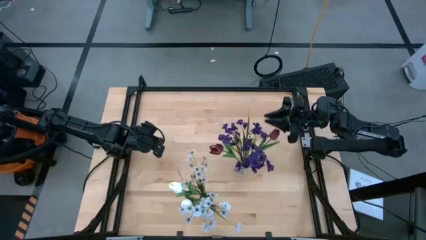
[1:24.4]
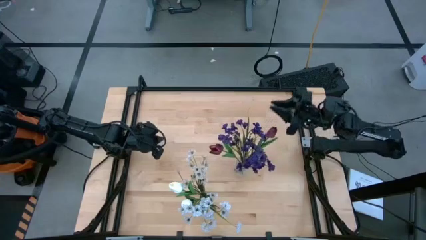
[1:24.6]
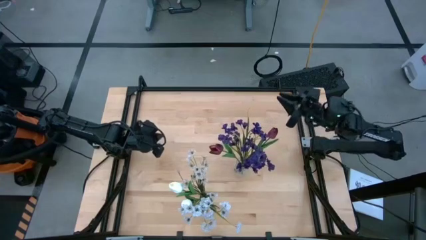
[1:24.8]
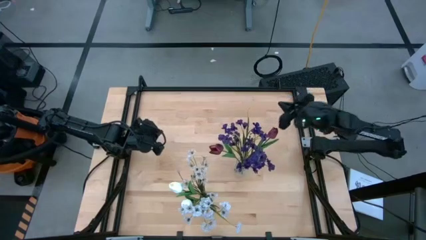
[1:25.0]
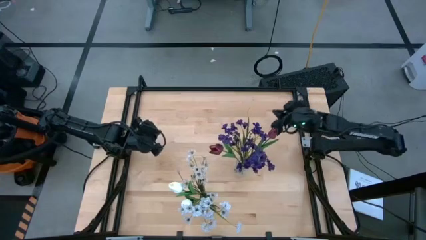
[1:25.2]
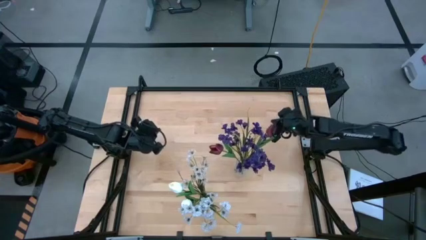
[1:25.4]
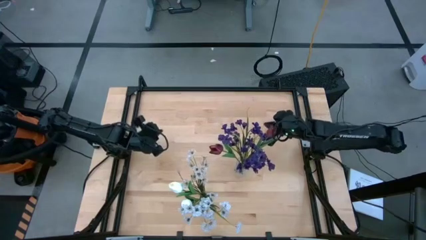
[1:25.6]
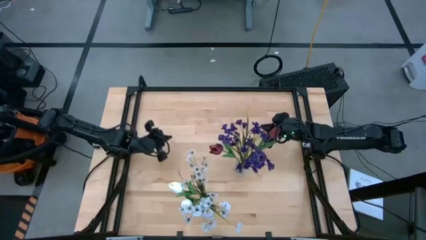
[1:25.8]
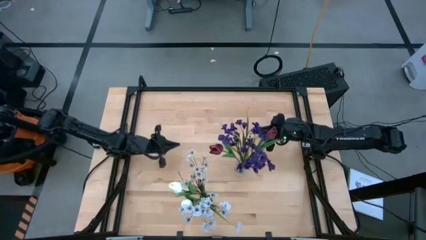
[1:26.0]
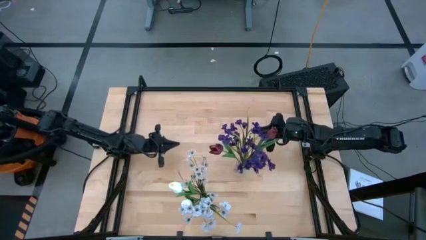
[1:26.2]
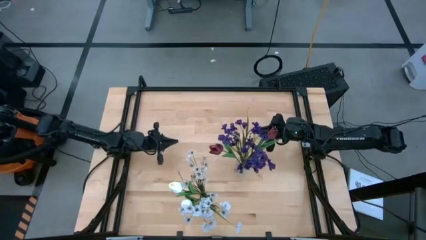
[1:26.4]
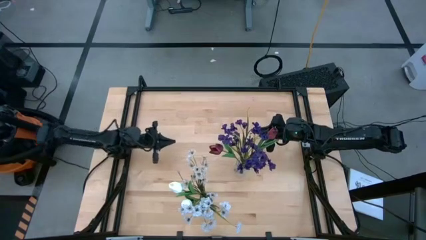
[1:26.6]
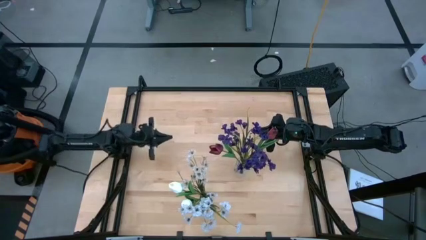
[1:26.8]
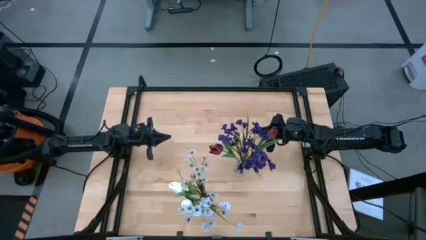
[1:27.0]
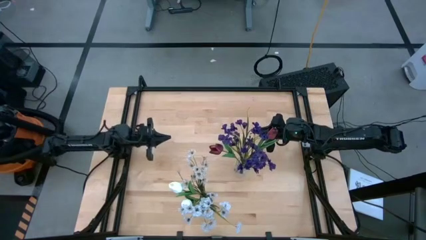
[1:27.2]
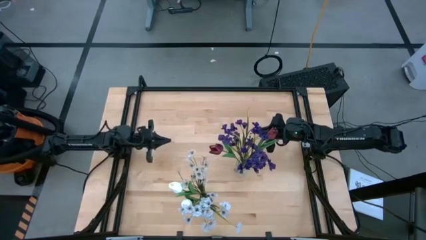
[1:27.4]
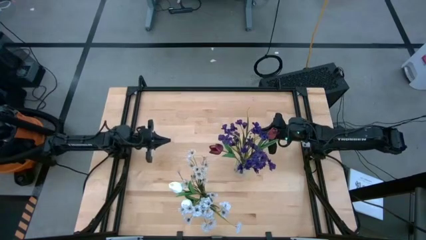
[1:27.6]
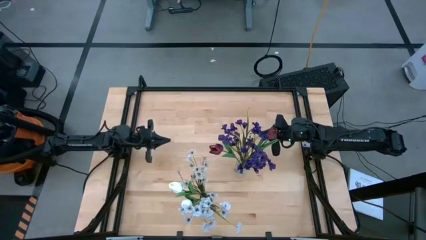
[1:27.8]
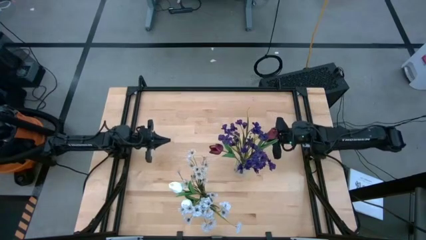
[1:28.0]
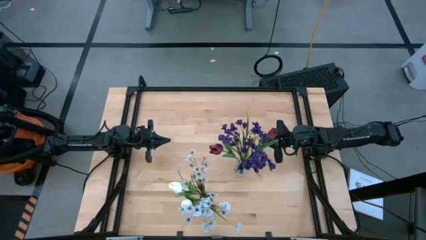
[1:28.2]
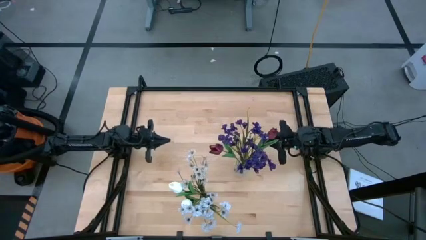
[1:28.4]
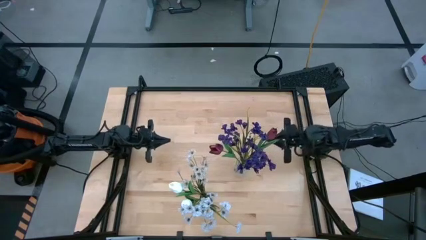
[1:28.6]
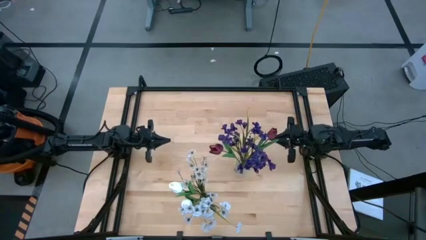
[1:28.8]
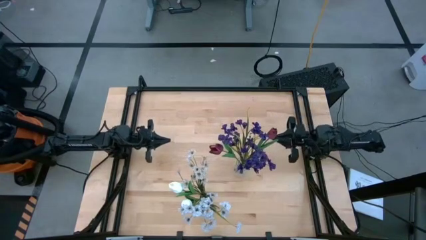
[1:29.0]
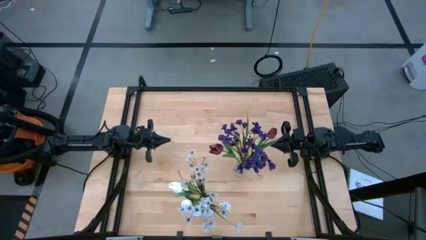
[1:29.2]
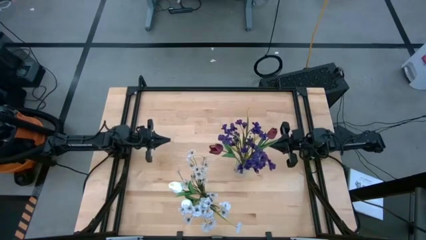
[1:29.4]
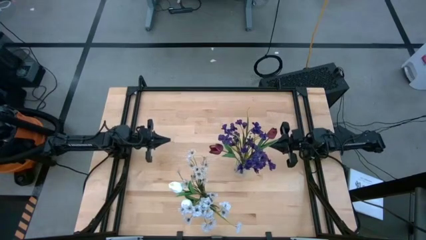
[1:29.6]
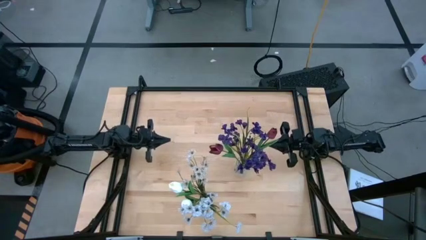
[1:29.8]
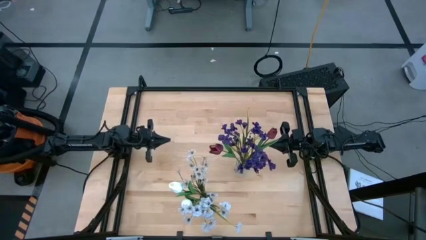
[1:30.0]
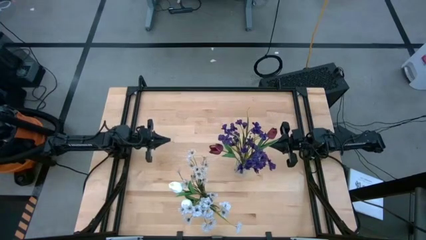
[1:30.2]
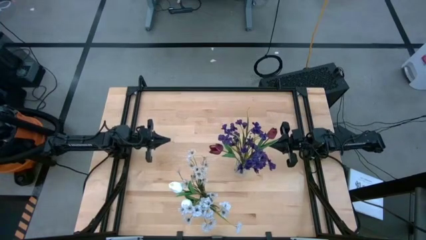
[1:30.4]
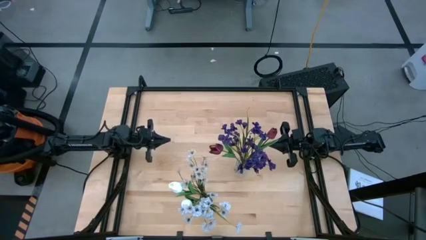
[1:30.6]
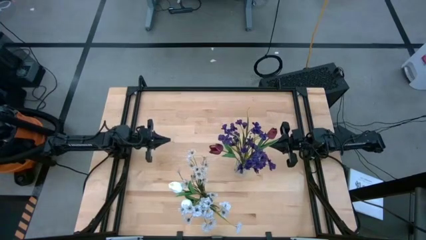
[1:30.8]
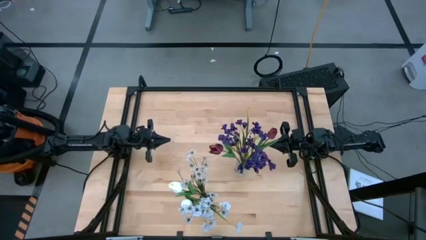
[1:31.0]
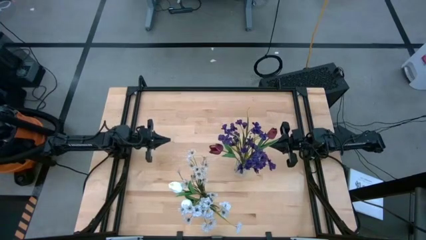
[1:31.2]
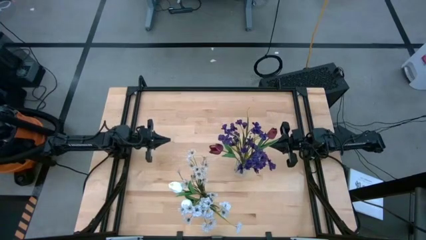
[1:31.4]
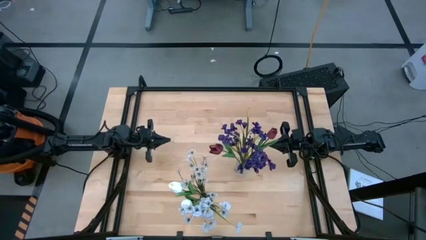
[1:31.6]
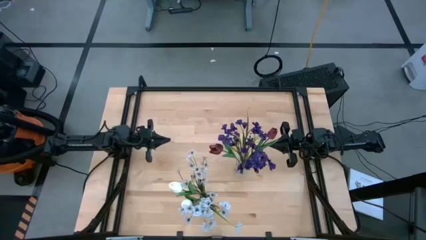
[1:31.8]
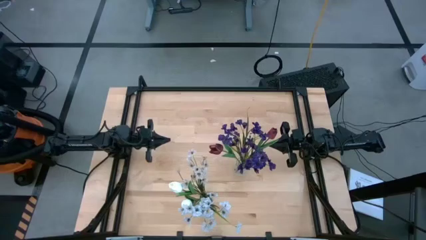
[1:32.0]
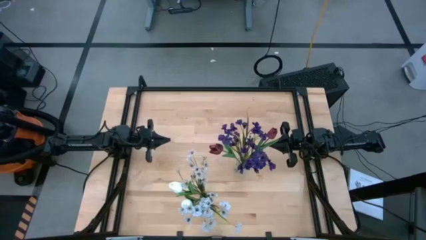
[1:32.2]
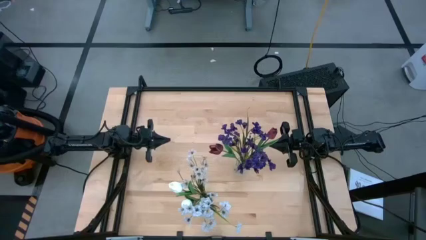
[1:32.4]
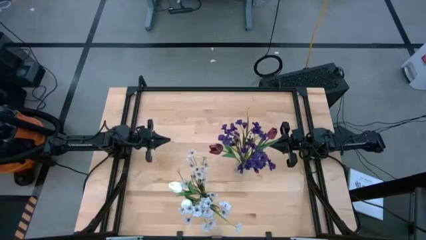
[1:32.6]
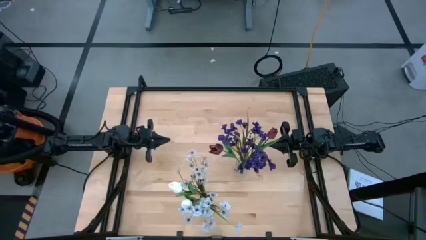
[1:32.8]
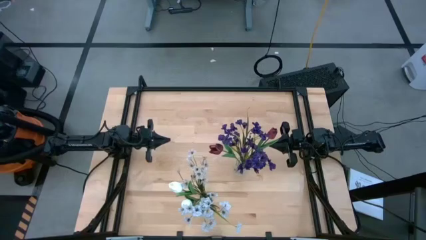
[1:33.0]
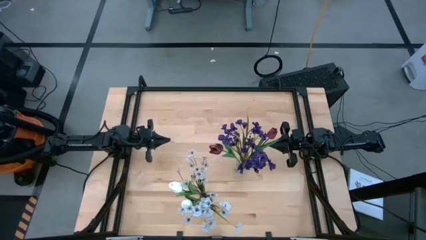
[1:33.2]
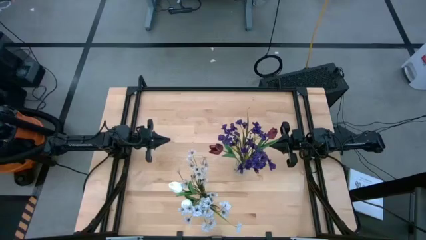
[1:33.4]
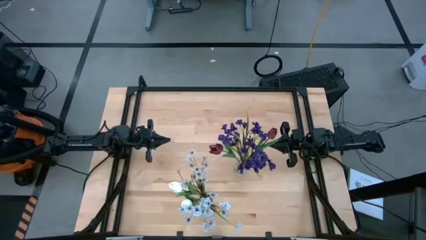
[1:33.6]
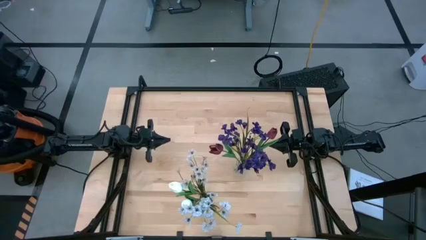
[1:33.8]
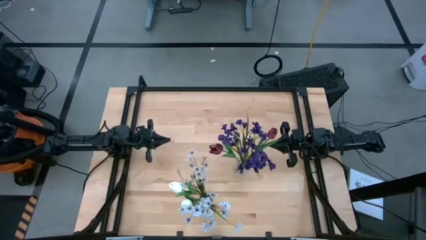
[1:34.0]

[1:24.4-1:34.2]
Task: Sort flowers into vase by color
Return to Home Position
